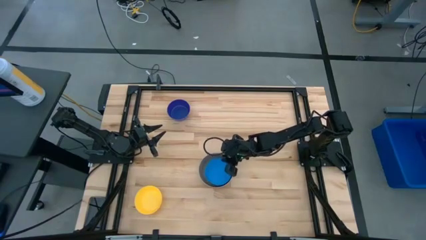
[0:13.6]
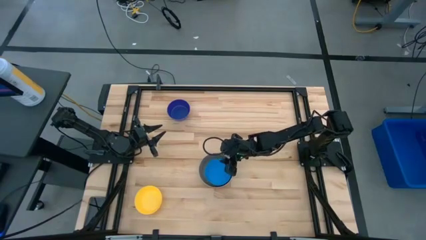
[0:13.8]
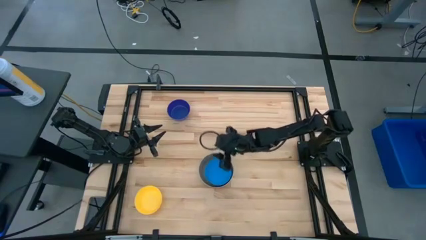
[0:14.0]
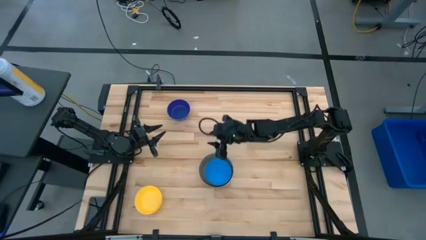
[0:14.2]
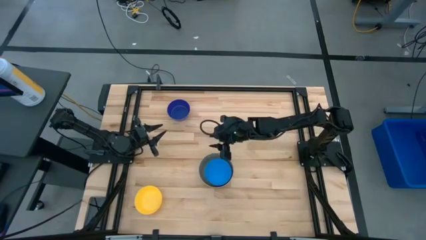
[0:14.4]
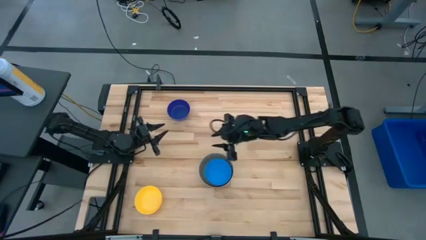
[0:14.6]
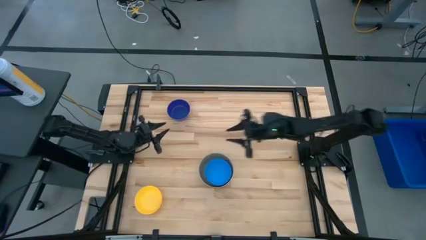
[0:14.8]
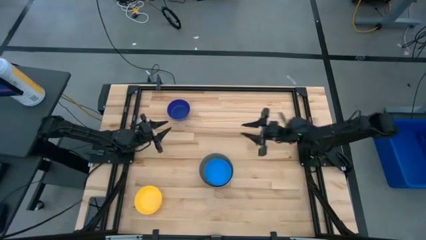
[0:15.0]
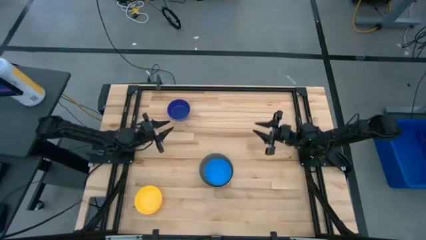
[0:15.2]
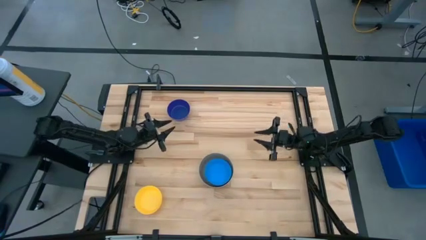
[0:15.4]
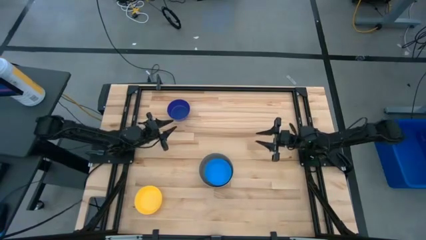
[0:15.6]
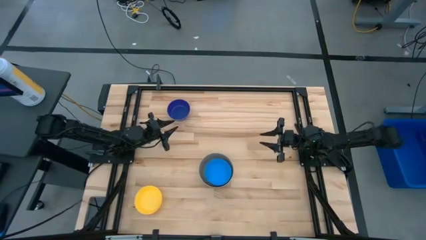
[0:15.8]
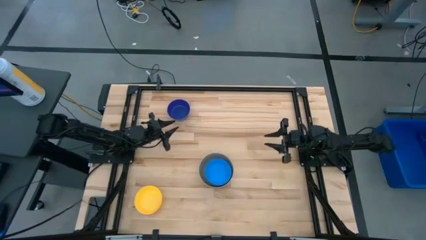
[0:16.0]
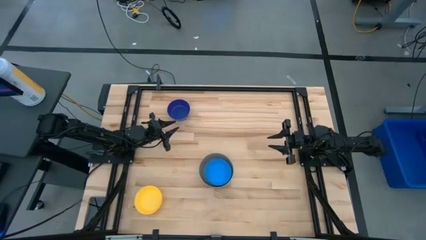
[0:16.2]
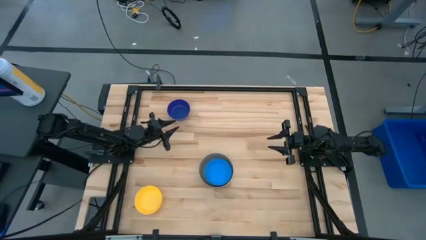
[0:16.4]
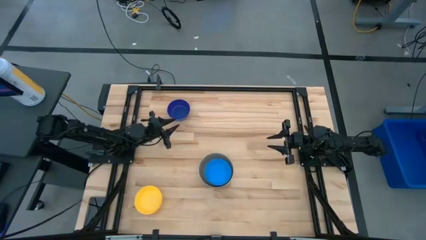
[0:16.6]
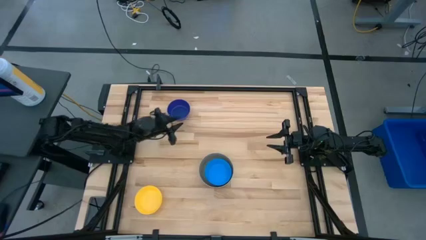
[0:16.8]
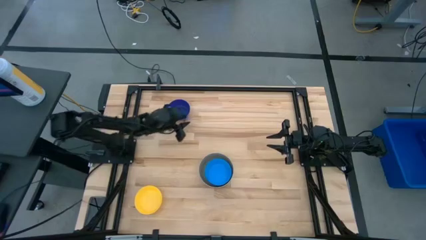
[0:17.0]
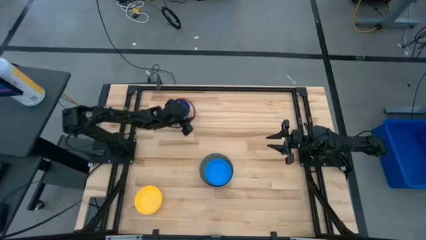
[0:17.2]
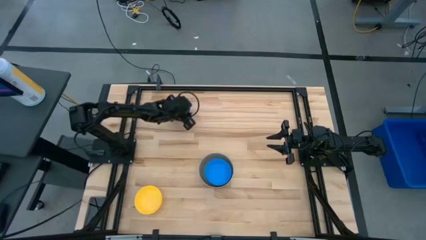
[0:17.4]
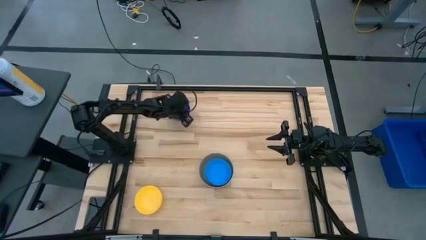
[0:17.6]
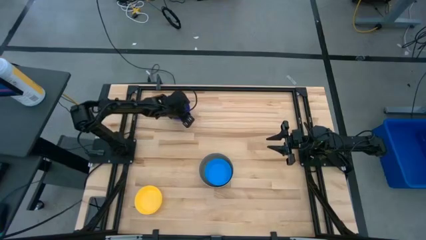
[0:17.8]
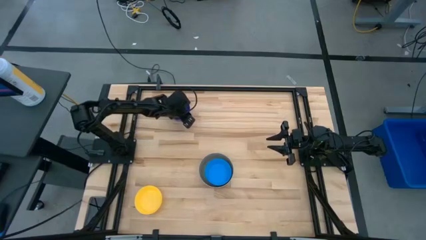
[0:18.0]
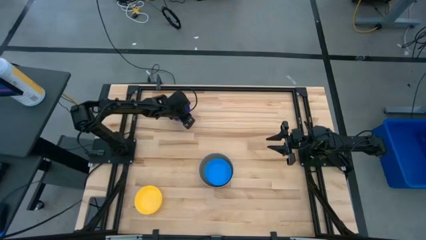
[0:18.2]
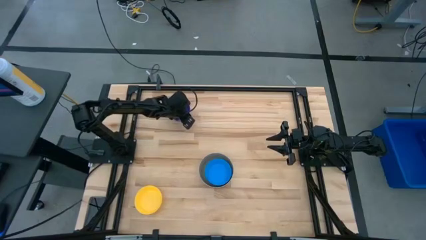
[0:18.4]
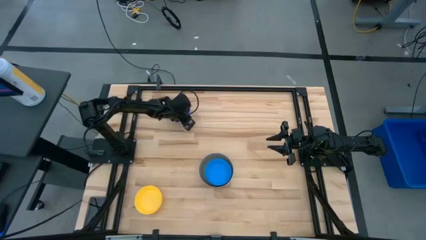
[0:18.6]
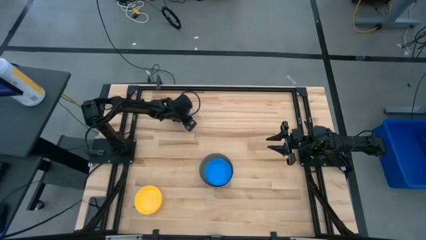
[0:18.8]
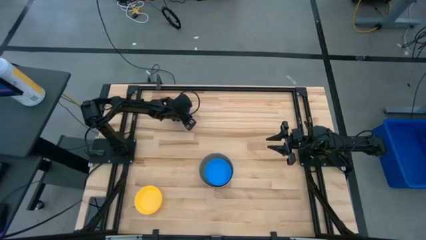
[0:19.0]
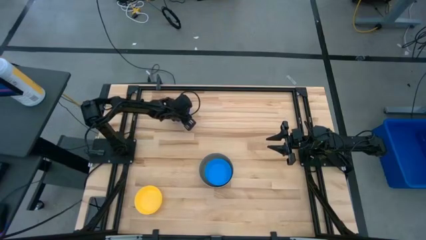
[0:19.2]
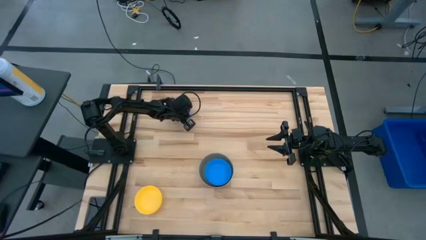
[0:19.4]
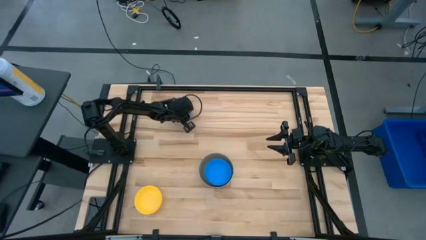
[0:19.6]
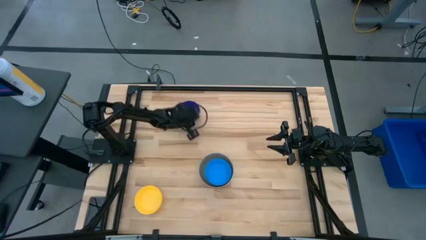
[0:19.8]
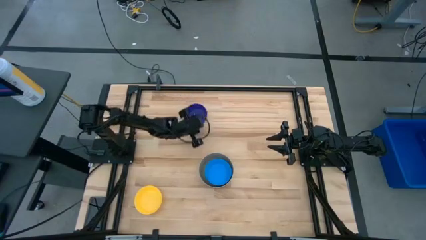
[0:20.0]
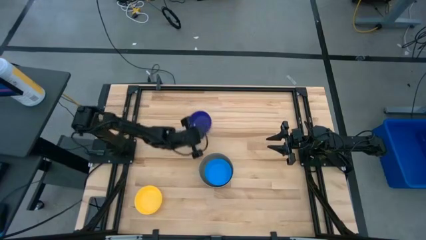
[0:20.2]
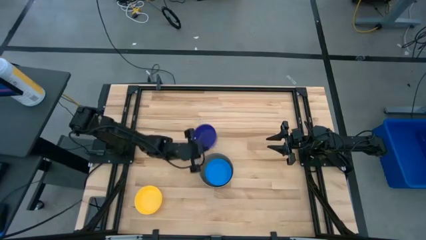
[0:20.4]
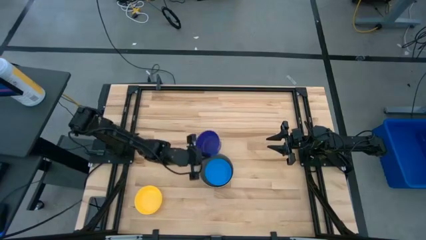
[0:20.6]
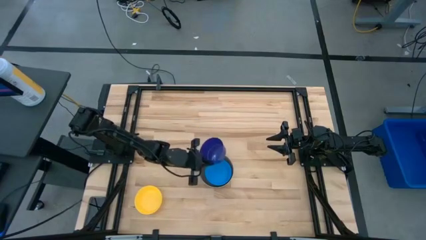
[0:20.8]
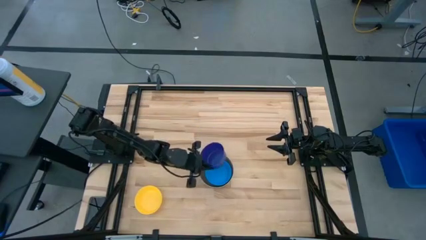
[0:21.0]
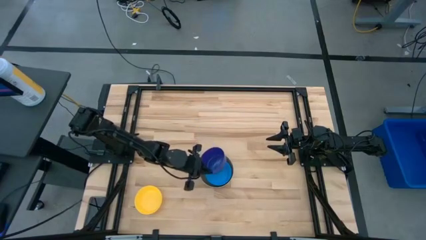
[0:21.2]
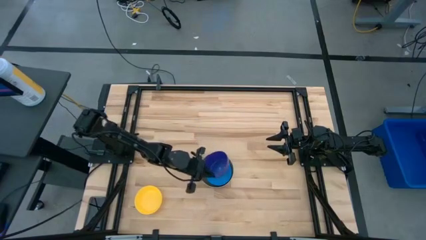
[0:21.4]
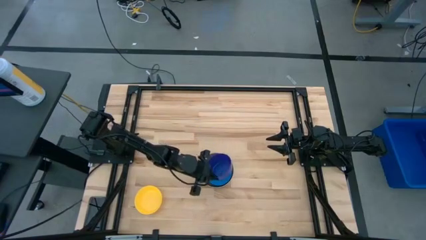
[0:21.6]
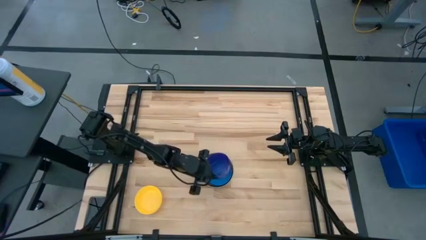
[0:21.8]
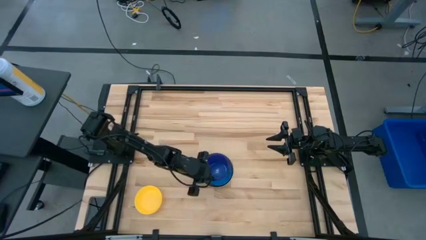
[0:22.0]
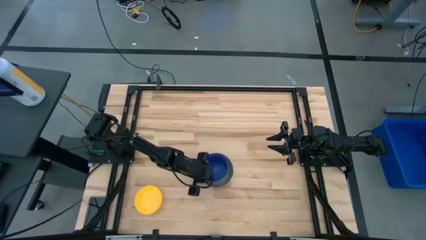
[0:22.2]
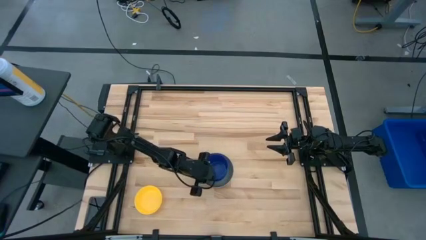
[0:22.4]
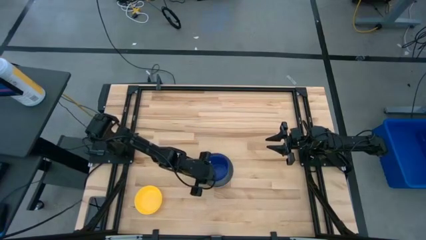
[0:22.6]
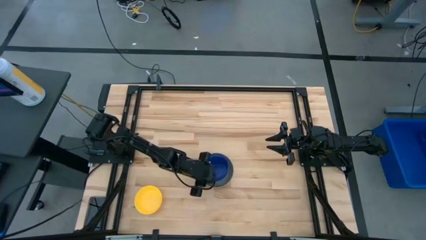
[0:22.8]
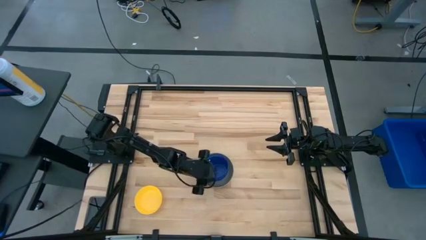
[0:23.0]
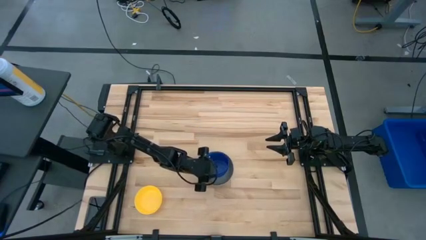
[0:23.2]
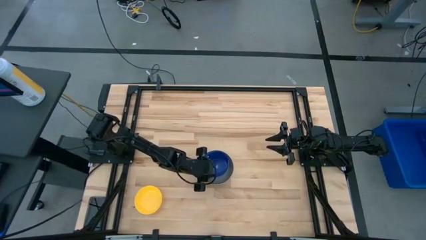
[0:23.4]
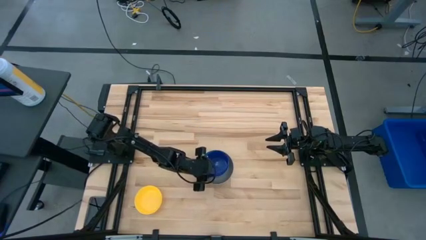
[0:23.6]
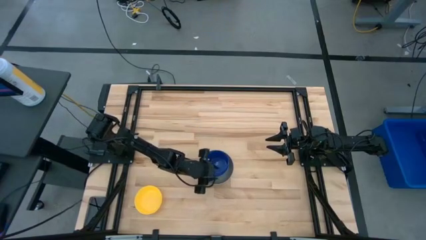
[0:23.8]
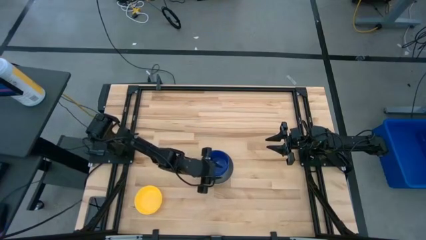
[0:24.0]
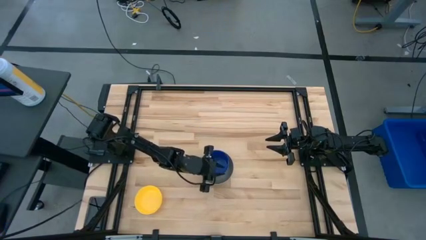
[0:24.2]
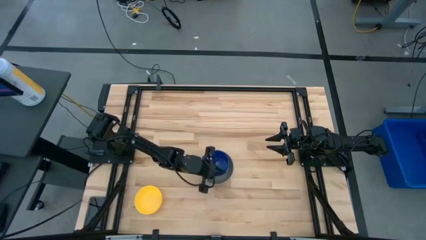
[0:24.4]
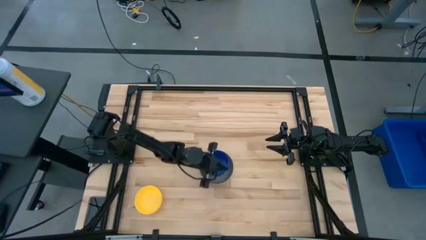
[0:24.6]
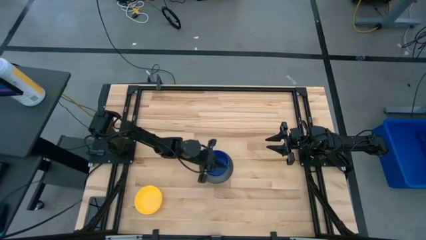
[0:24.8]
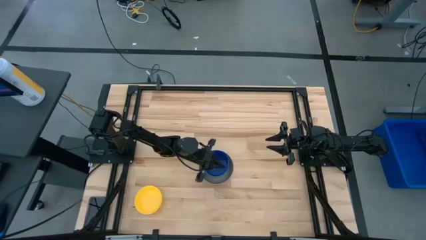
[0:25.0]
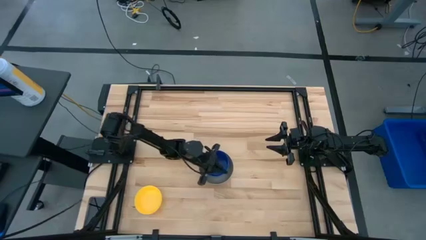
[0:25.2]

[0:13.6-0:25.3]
Stack the blue bowl on the light blue bowl

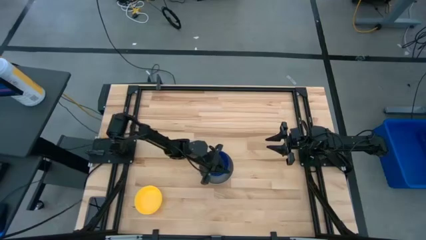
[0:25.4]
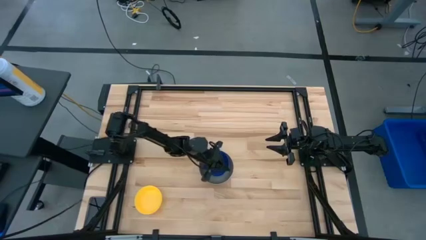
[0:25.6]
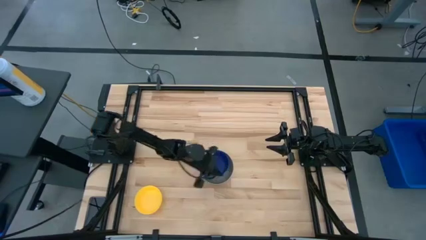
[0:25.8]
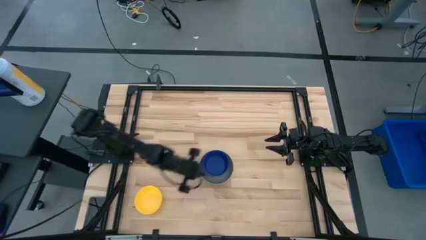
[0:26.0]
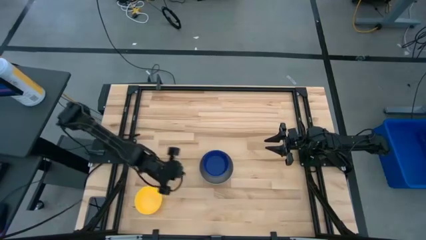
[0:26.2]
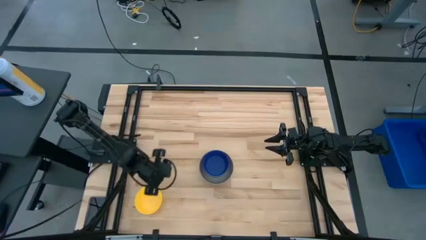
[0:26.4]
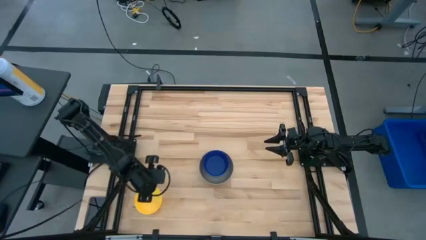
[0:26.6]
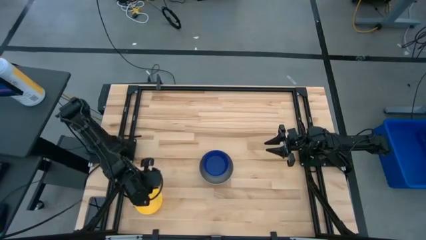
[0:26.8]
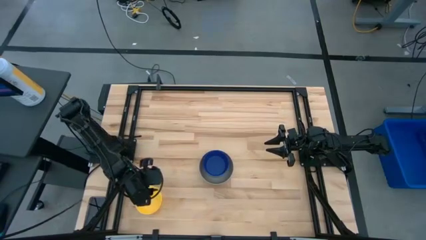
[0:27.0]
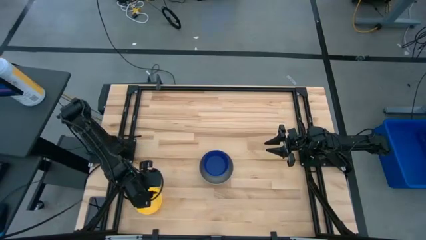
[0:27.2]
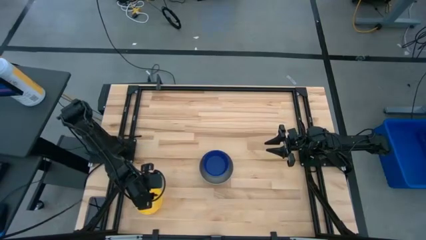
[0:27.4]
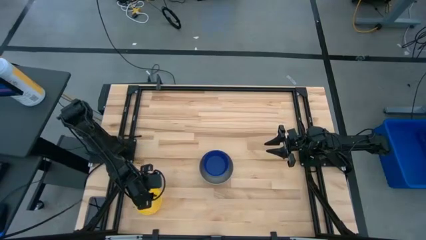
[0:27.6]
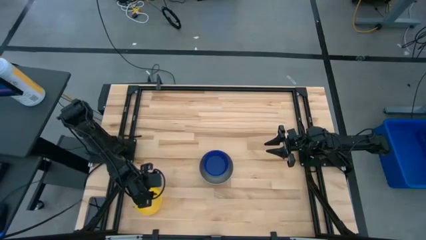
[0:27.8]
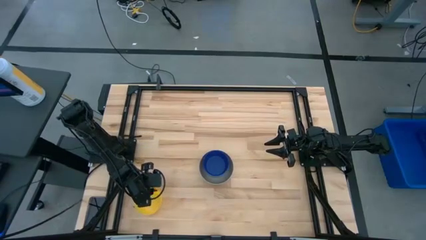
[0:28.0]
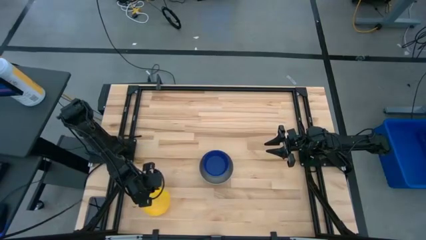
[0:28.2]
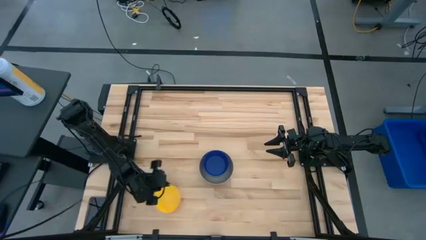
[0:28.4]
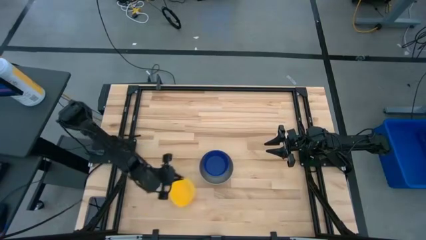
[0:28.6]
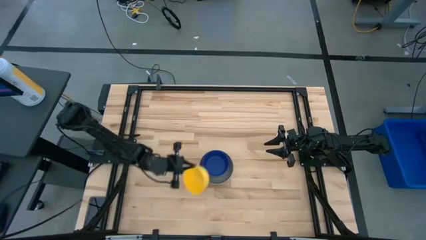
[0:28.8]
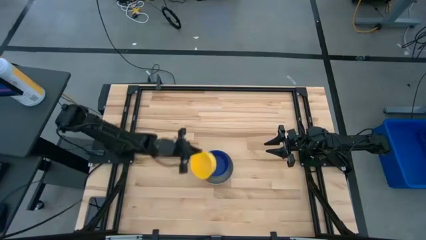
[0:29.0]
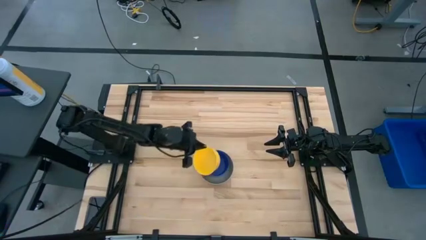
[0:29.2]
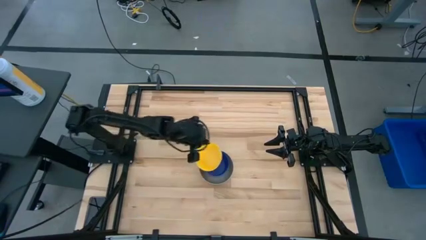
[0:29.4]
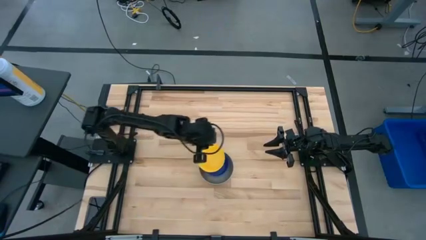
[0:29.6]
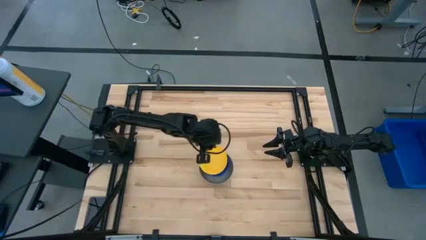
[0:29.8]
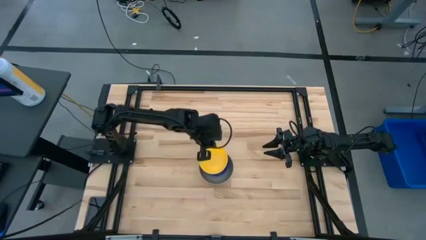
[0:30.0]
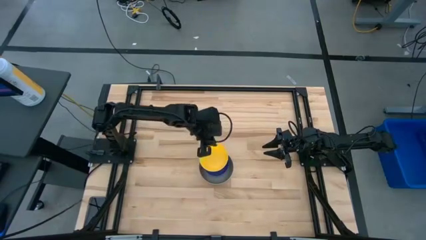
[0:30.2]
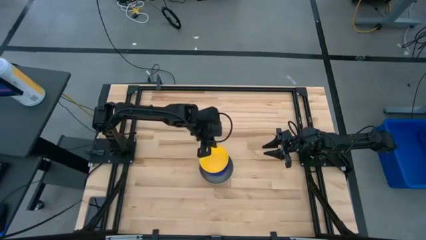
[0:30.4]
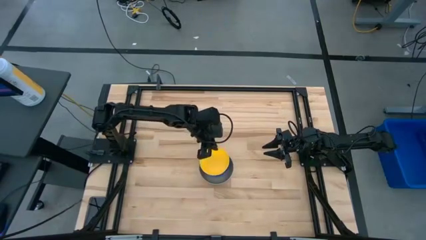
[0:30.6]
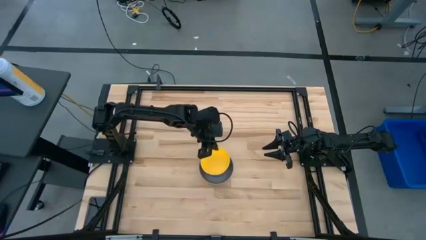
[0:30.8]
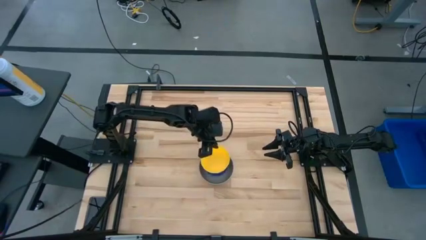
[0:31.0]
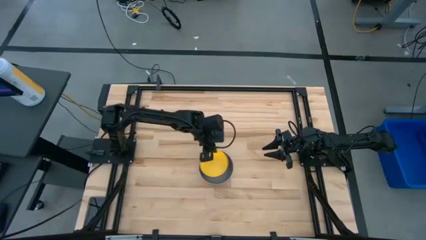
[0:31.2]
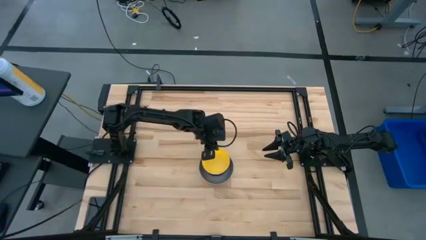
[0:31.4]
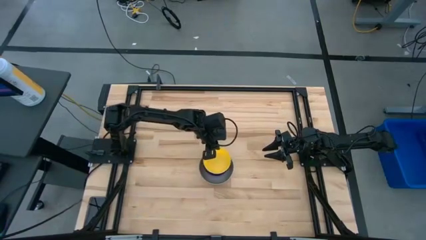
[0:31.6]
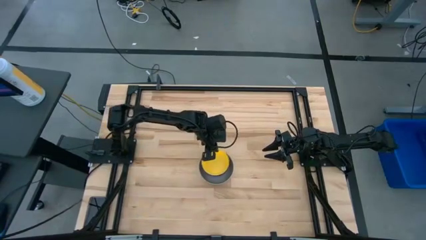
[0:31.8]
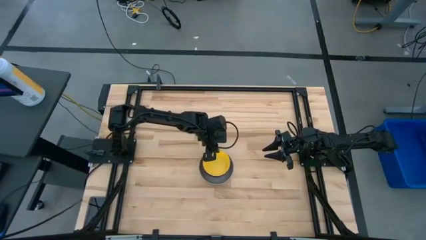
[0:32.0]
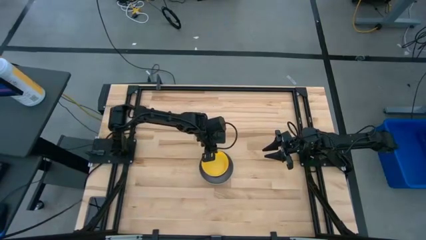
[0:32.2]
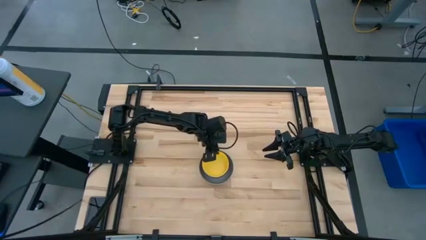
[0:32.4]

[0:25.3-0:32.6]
Stack the yellow bowl on the blue bowl
